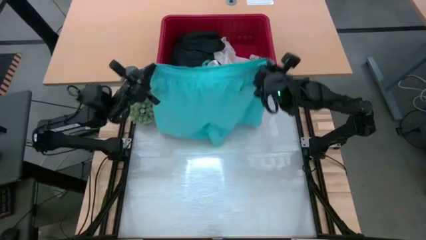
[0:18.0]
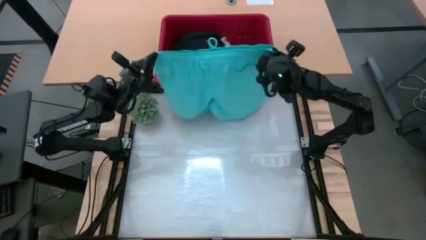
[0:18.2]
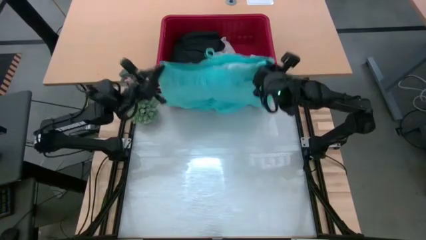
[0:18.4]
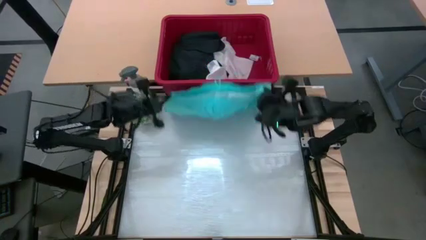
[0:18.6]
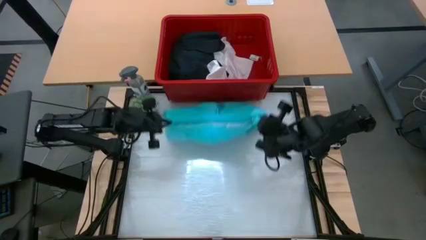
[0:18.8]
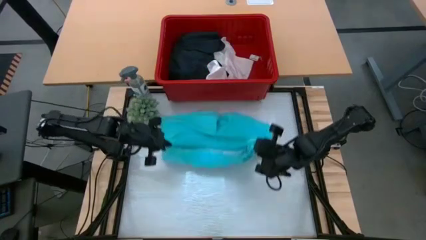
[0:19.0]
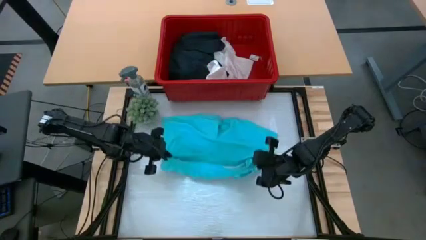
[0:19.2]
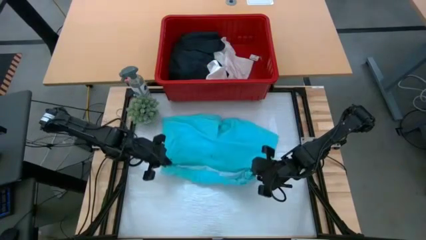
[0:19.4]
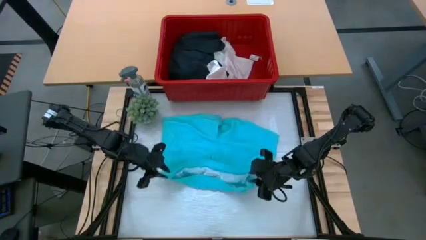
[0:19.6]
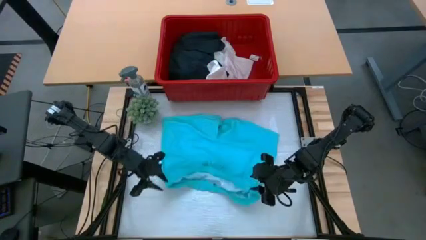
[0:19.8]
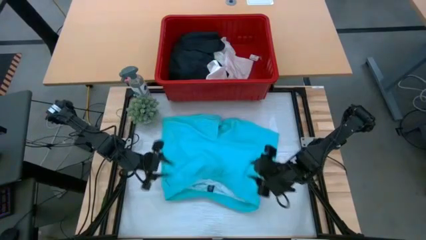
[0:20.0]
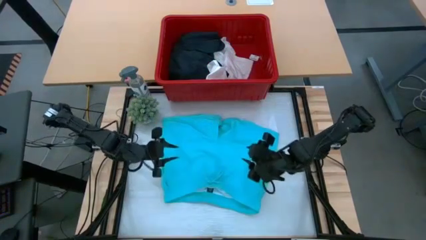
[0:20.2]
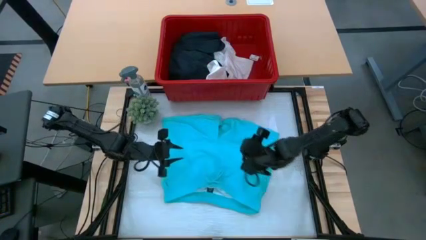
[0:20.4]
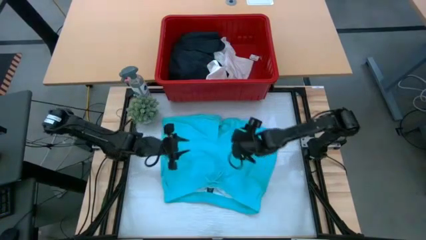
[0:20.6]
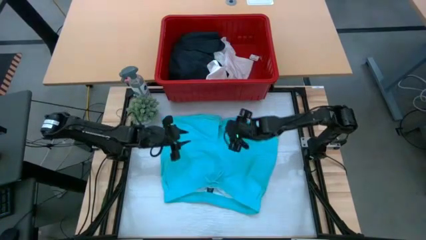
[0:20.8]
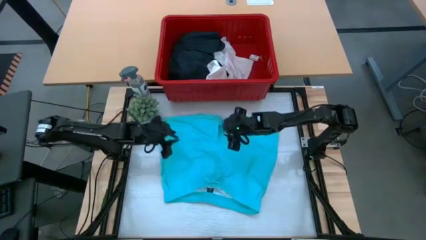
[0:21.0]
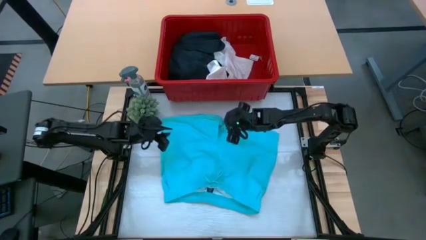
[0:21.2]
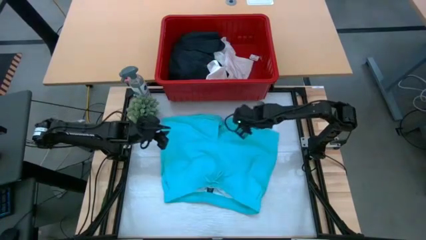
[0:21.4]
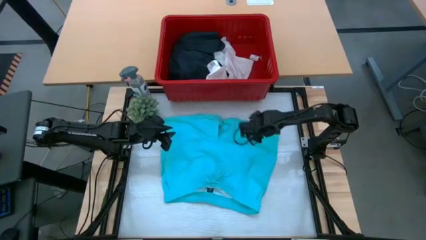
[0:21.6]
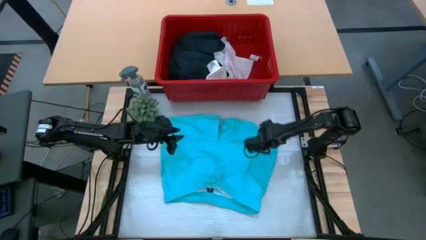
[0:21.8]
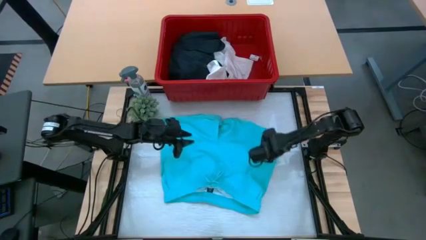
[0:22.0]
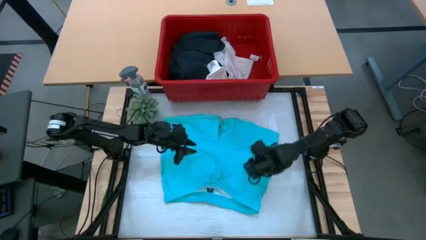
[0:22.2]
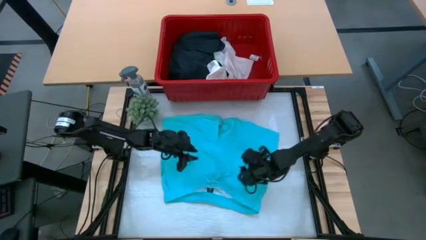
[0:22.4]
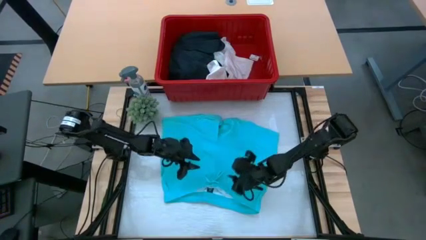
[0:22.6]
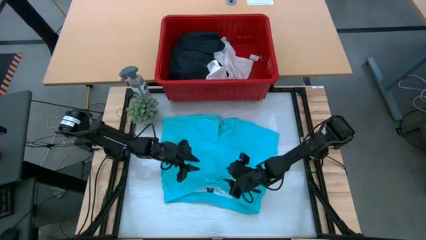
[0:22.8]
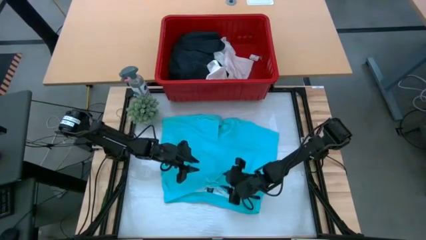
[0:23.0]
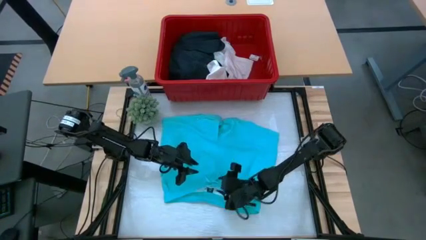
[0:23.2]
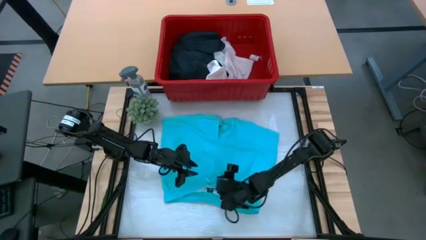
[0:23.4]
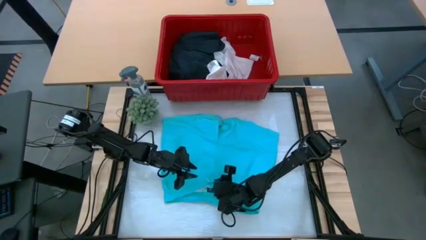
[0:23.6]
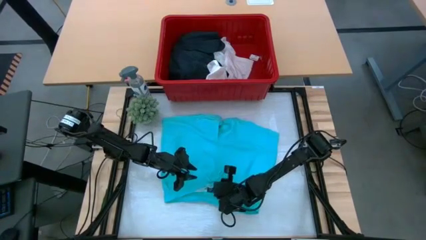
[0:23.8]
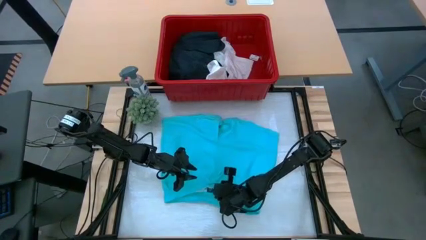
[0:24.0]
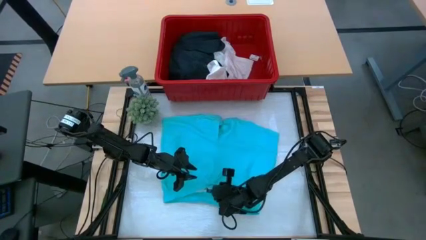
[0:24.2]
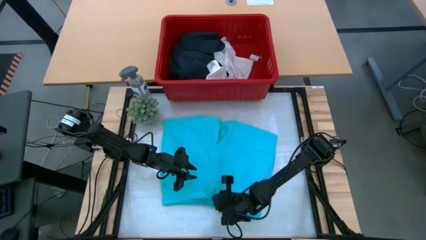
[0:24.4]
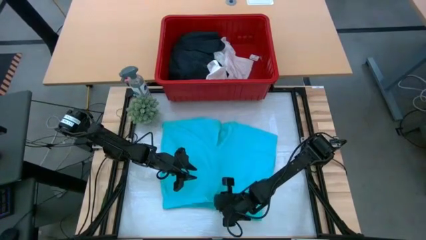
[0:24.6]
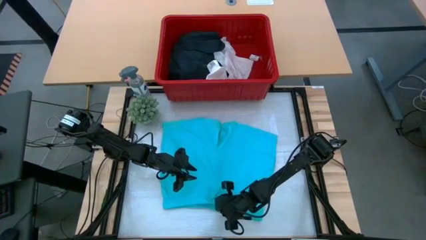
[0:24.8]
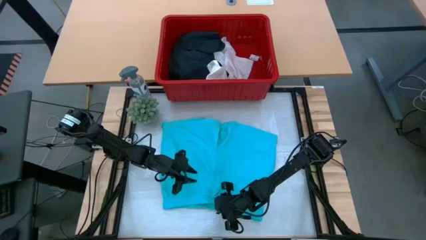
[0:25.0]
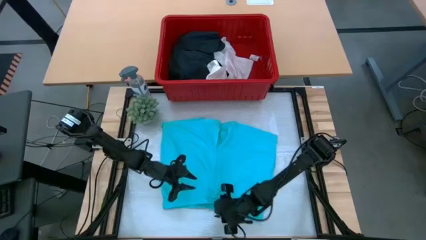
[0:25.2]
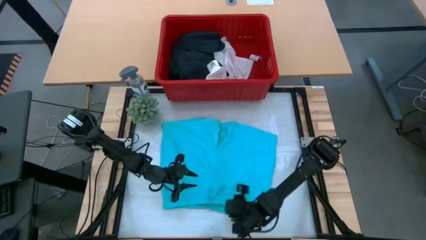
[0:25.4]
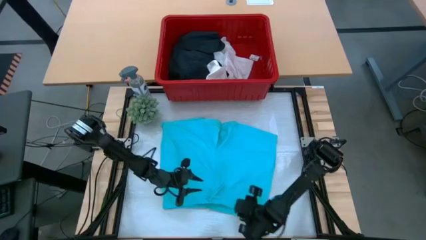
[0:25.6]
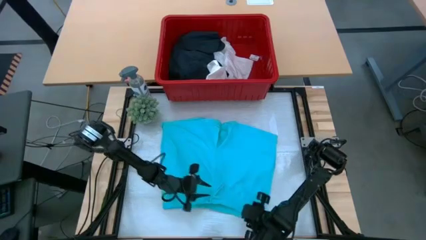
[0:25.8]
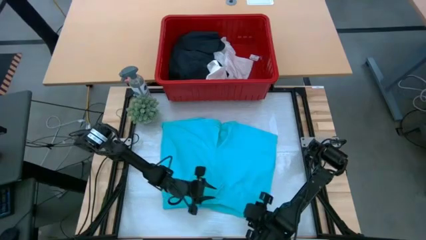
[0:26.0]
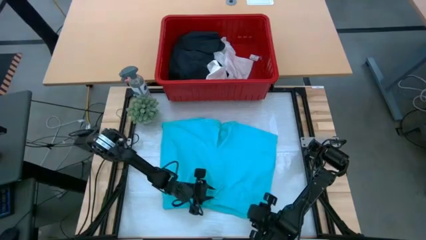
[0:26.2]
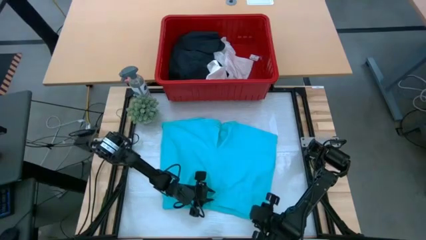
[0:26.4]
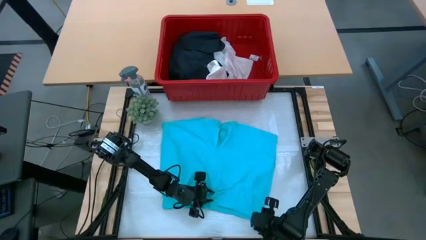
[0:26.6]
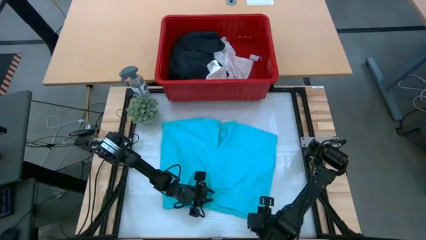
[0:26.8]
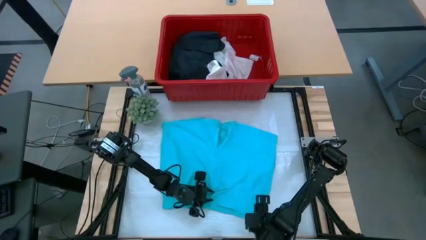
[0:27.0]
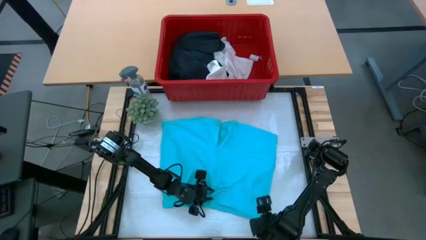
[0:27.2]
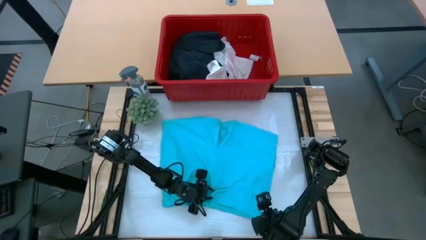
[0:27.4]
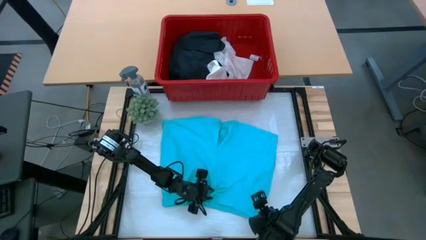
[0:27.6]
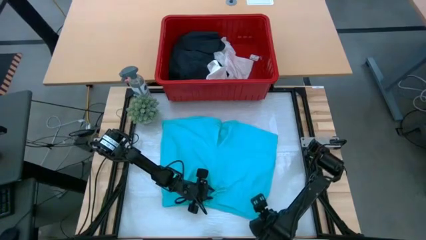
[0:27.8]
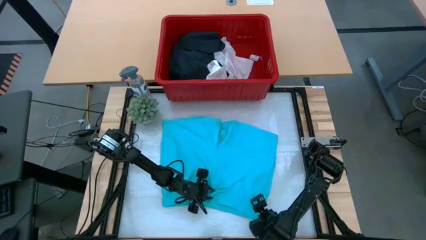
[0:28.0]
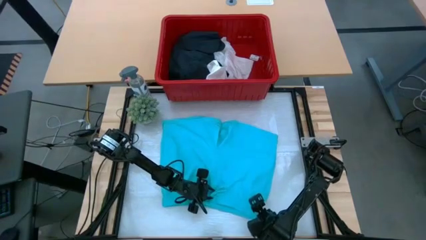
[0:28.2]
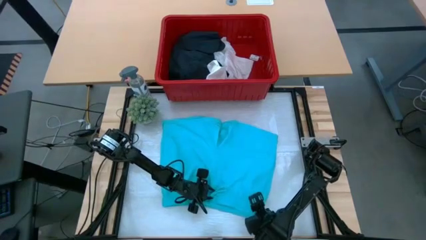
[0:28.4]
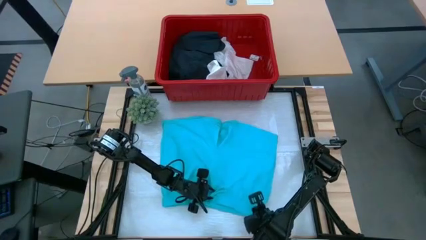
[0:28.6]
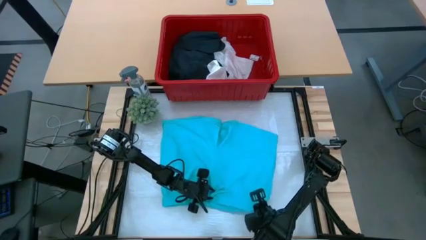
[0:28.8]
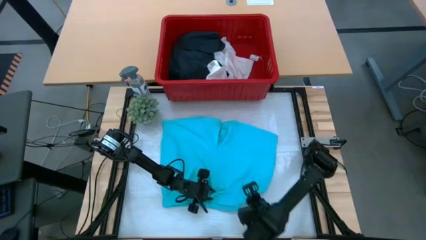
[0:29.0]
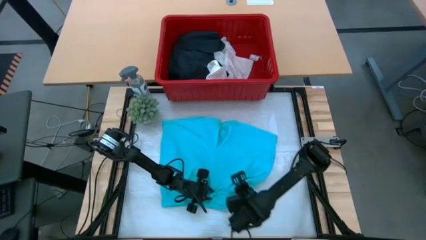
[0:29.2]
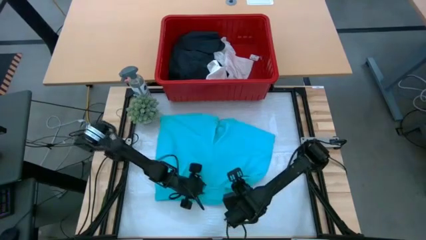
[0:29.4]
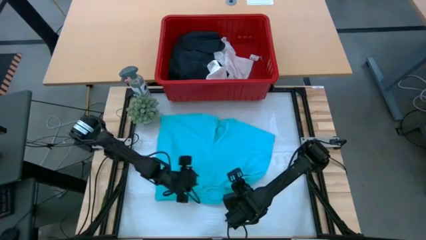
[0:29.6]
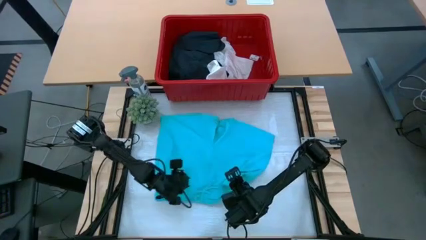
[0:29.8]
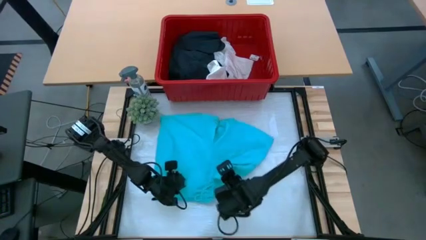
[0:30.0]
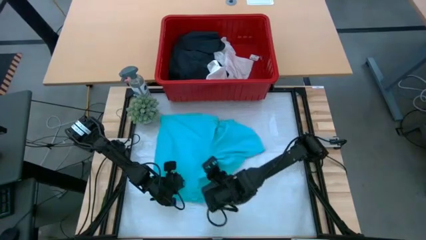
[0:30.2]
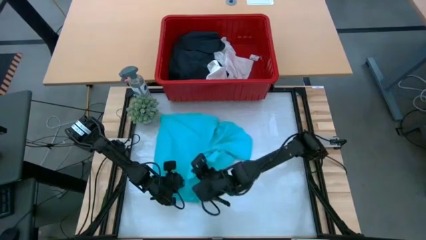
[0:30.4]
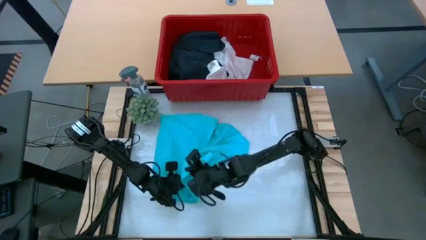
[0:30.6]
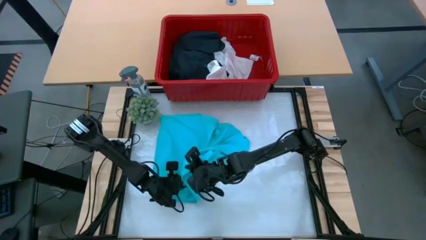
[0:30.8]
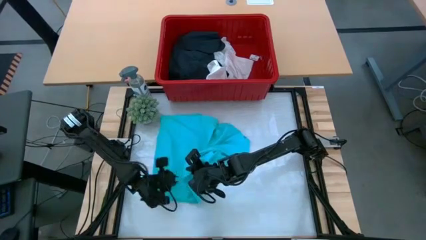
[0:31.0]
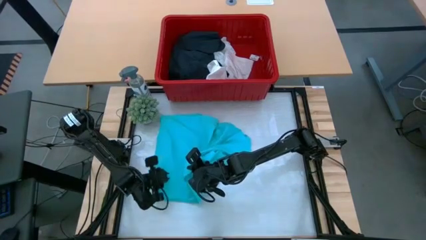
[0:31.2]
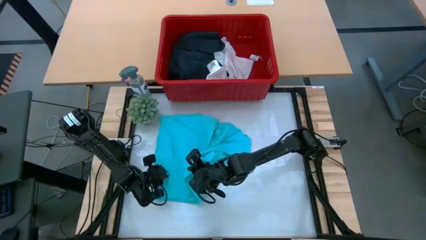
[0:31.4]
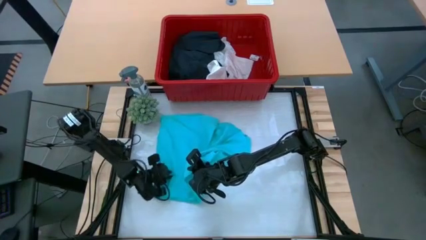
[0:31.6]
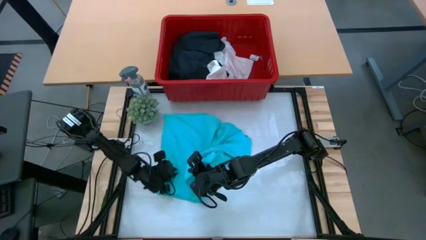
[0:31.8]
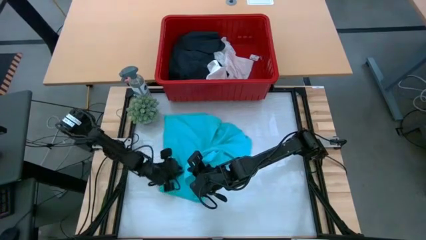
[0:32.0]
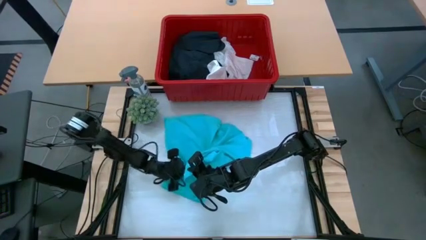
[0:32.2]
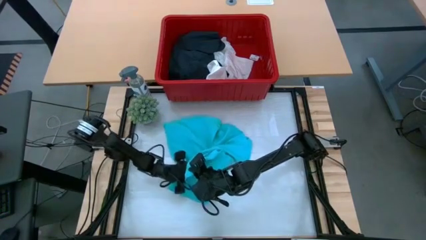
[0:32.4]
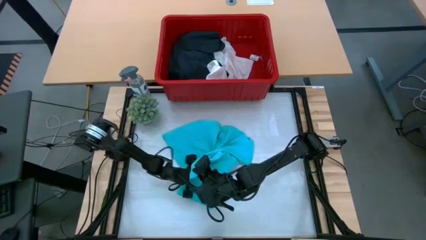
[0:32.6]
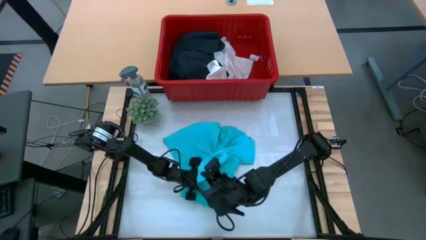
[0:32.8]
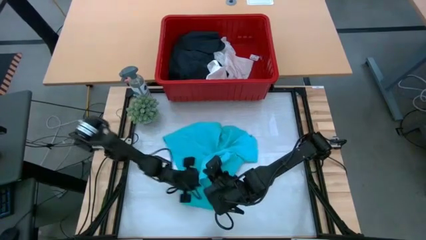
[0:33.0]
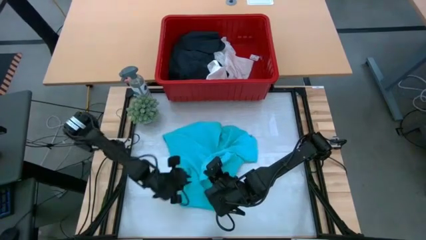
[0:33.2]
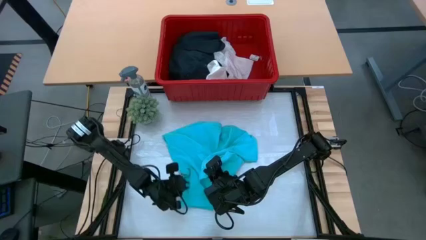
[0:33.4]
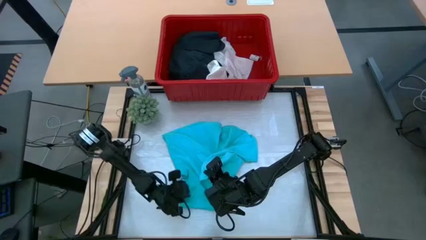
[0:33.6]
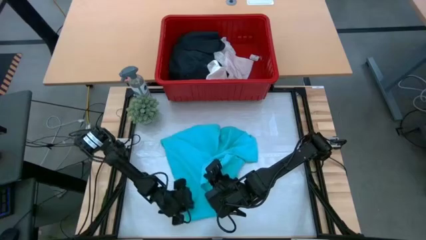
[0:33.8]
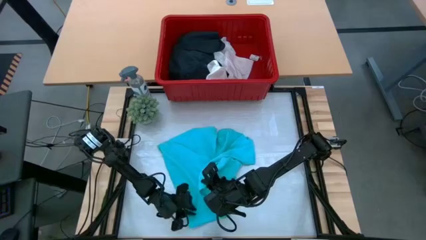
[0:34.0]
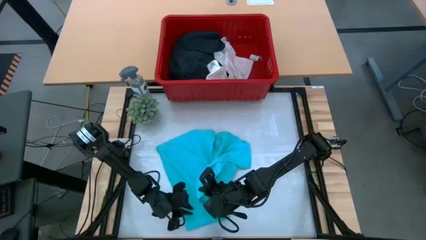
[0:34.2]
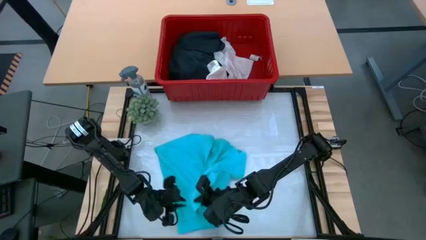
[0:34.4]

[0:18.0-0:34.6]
Task: Fold Laundry from Bin
Fold the blue shorts
